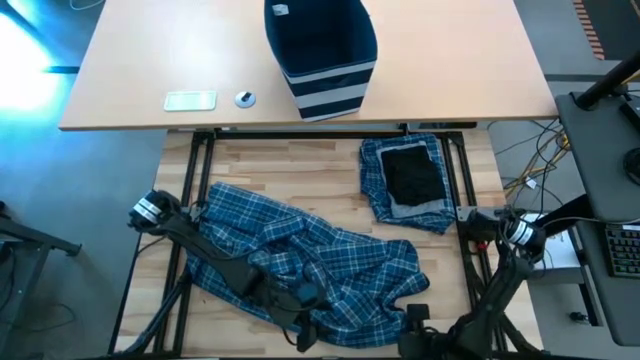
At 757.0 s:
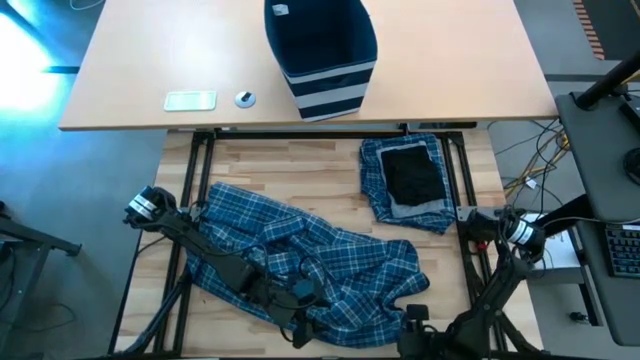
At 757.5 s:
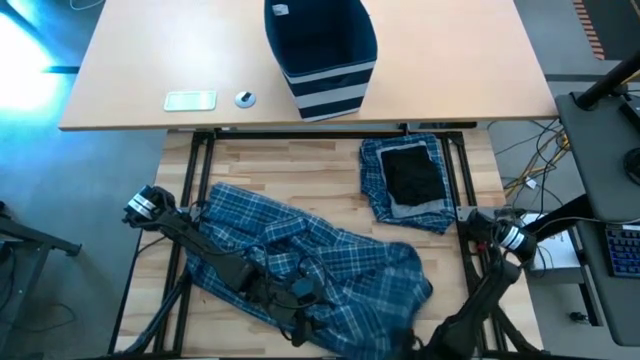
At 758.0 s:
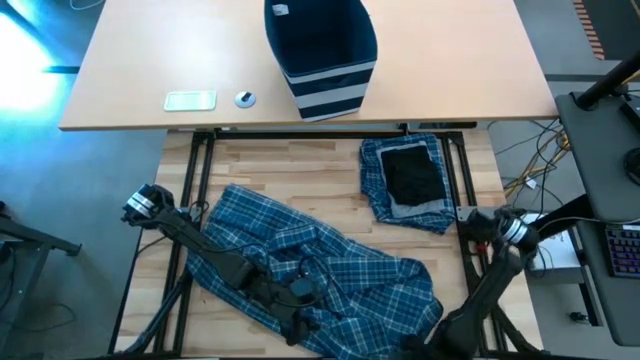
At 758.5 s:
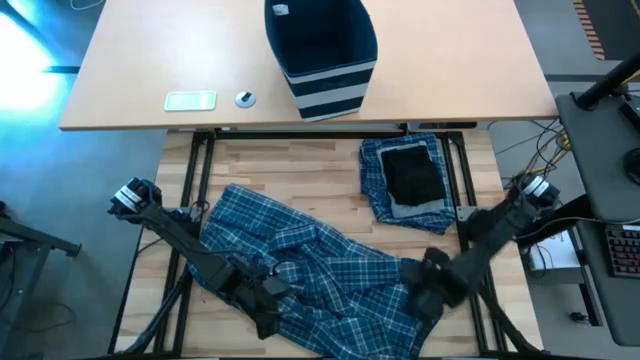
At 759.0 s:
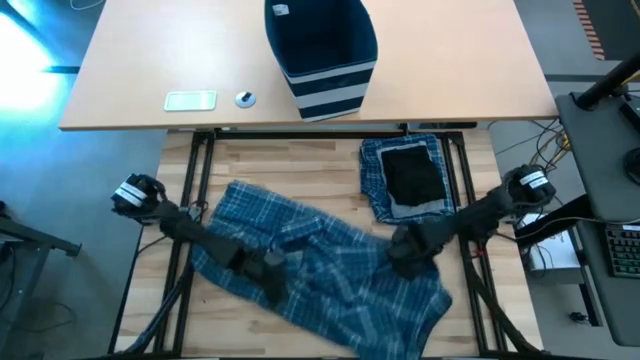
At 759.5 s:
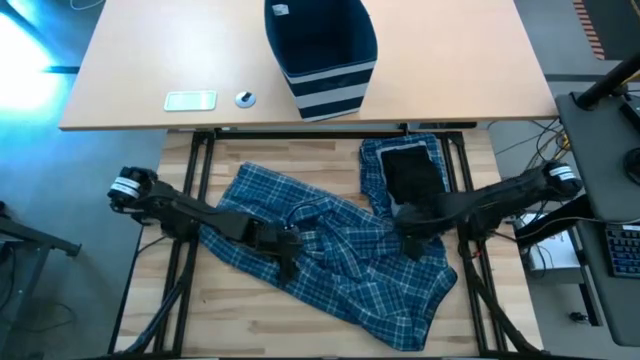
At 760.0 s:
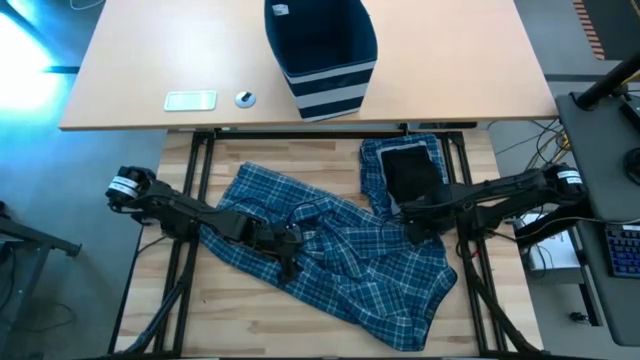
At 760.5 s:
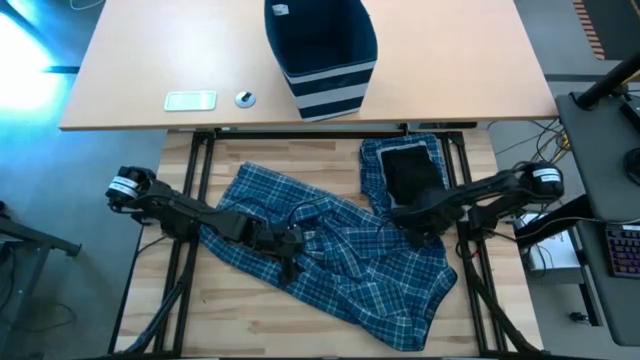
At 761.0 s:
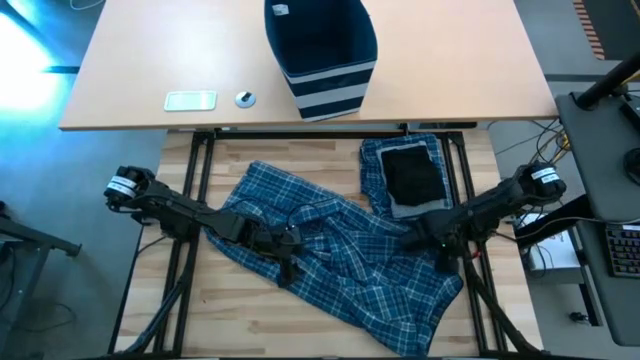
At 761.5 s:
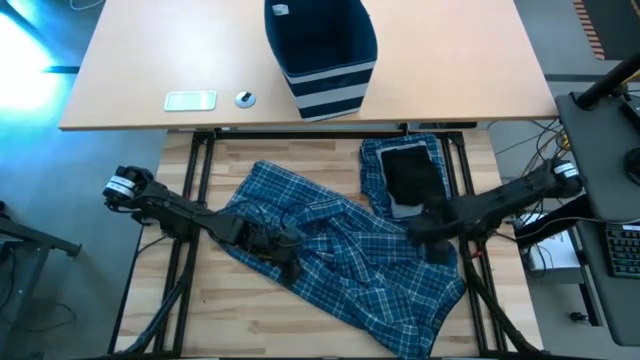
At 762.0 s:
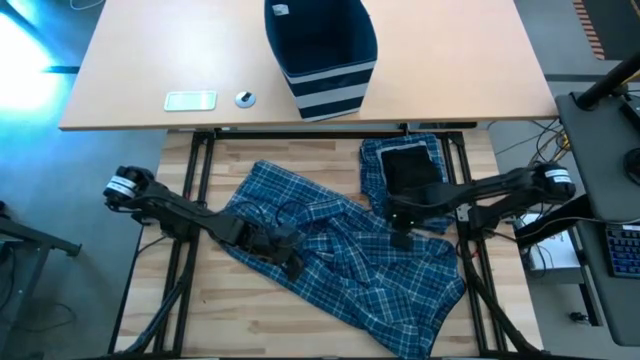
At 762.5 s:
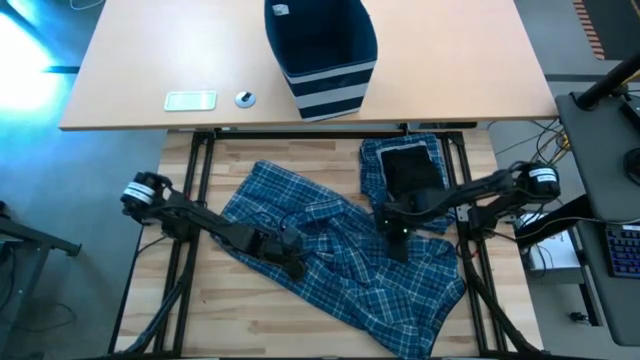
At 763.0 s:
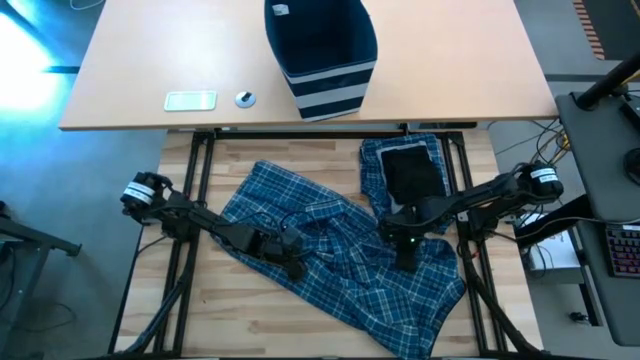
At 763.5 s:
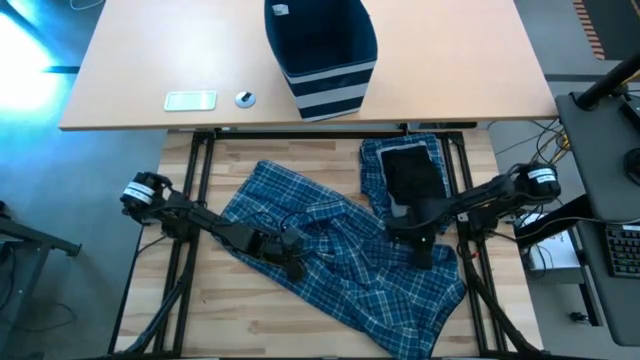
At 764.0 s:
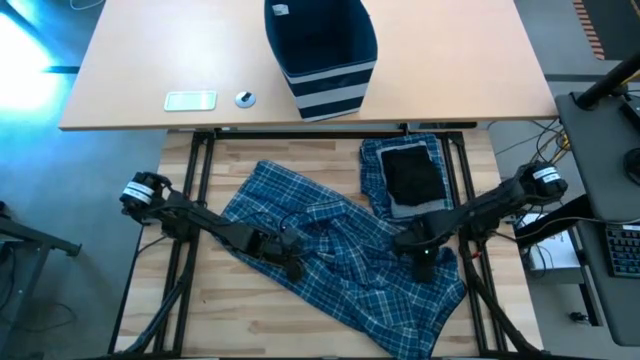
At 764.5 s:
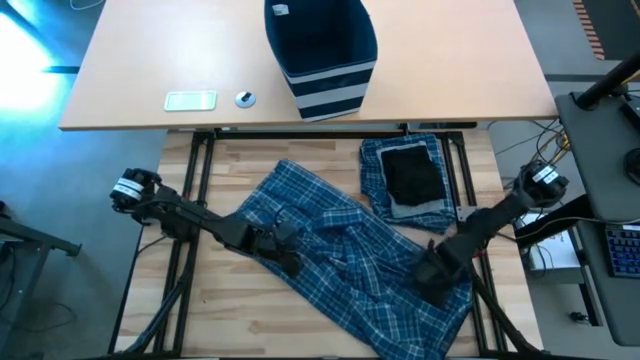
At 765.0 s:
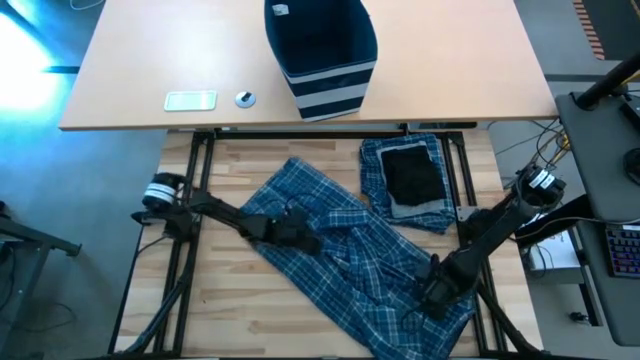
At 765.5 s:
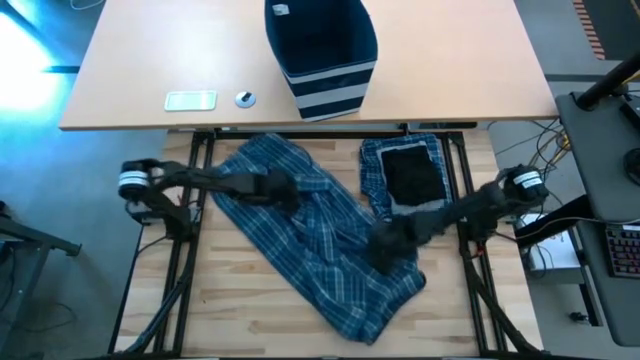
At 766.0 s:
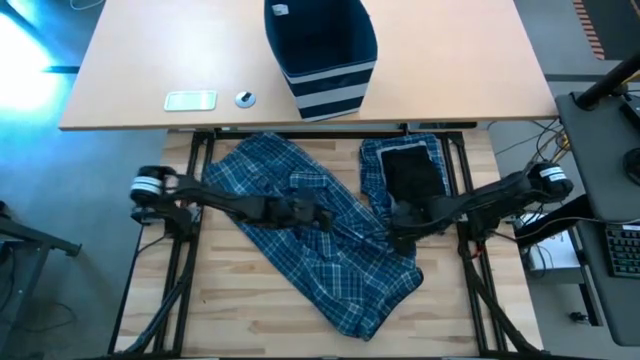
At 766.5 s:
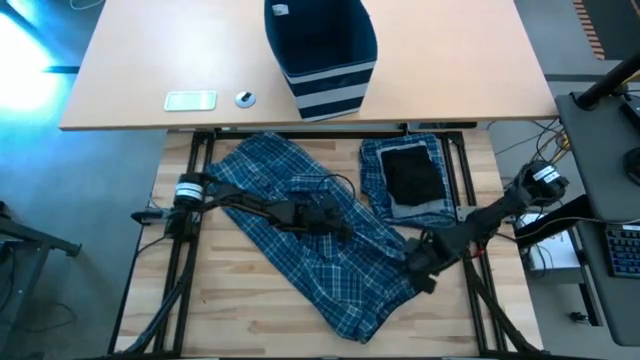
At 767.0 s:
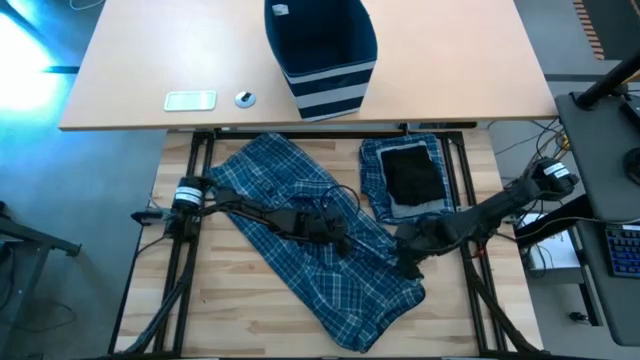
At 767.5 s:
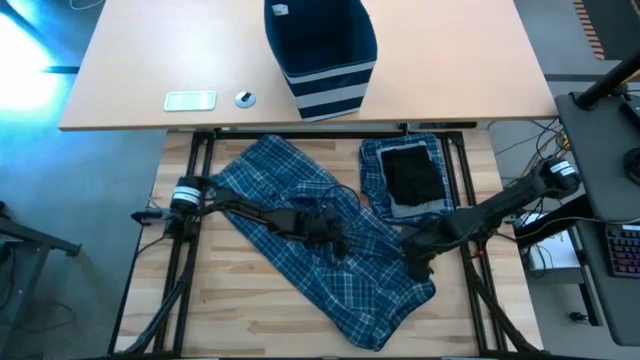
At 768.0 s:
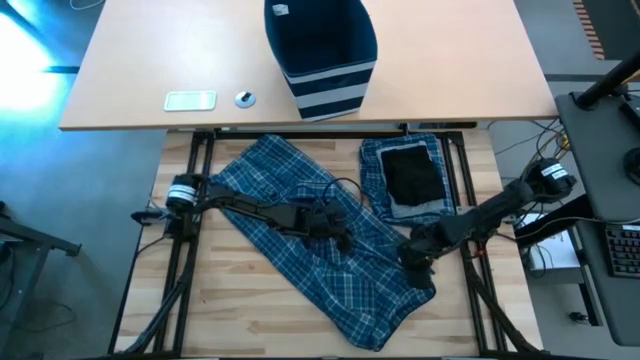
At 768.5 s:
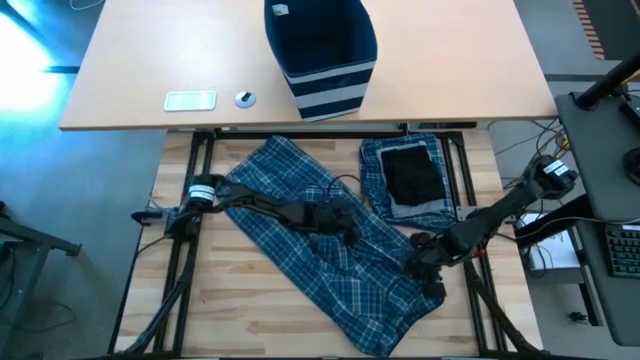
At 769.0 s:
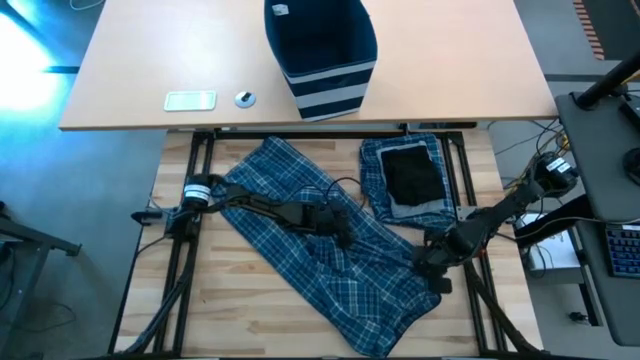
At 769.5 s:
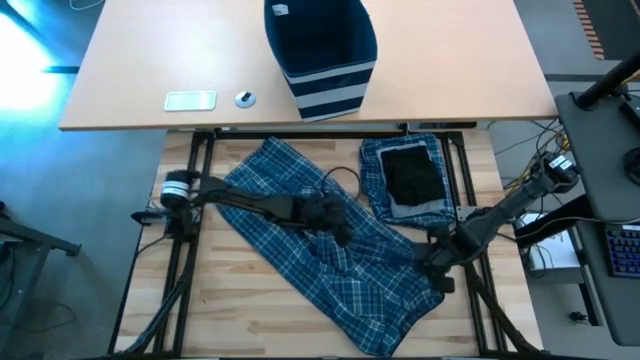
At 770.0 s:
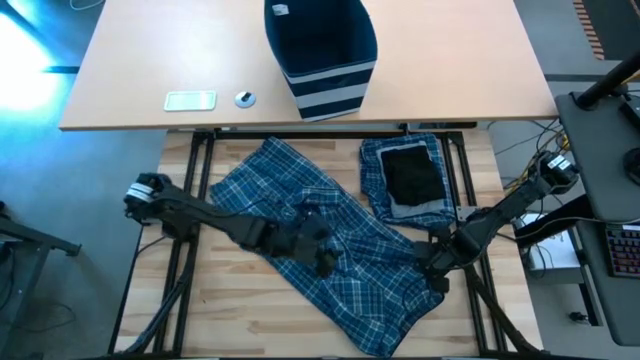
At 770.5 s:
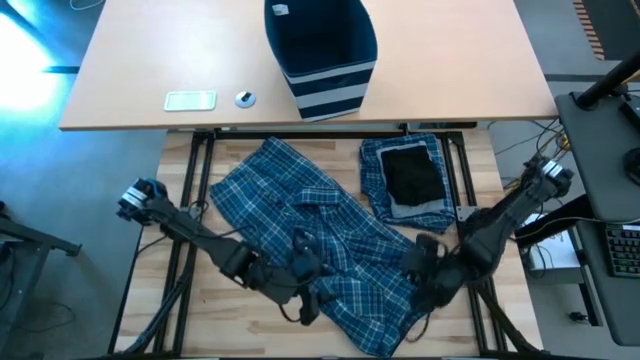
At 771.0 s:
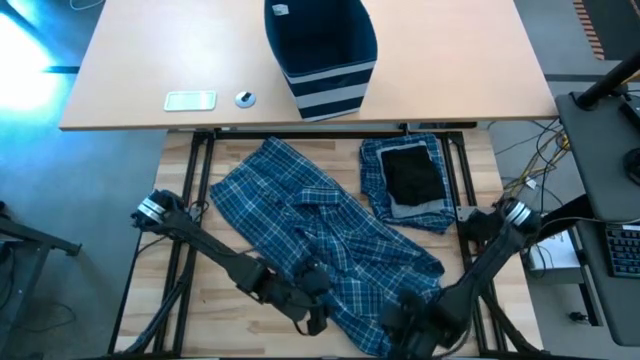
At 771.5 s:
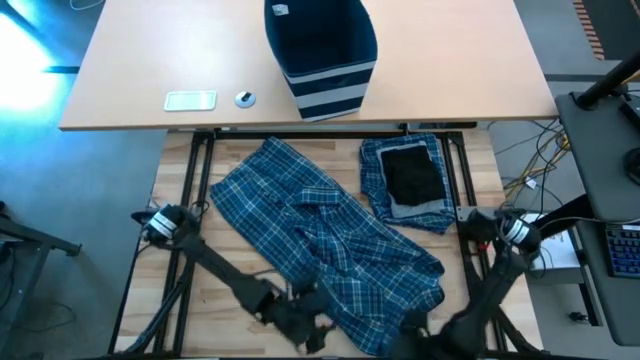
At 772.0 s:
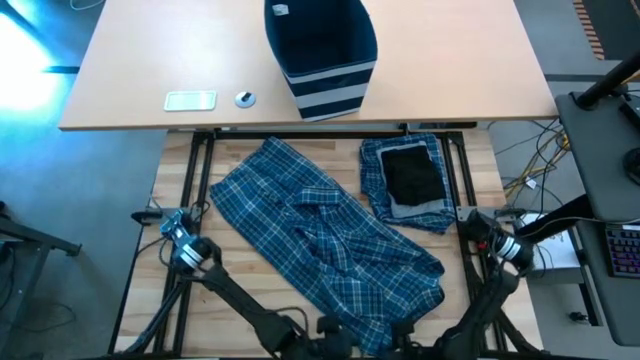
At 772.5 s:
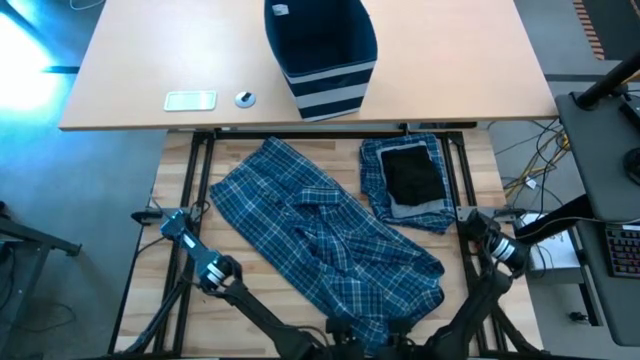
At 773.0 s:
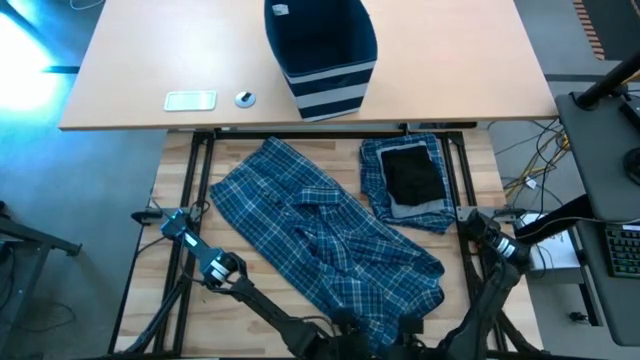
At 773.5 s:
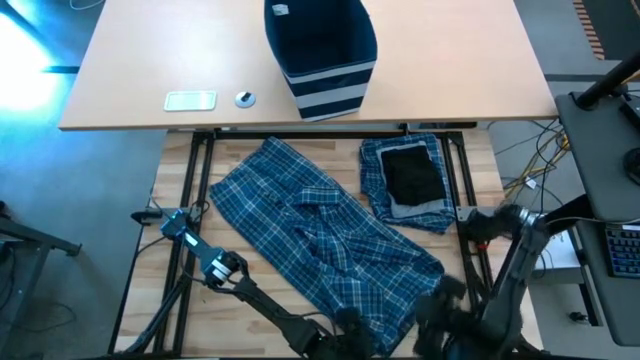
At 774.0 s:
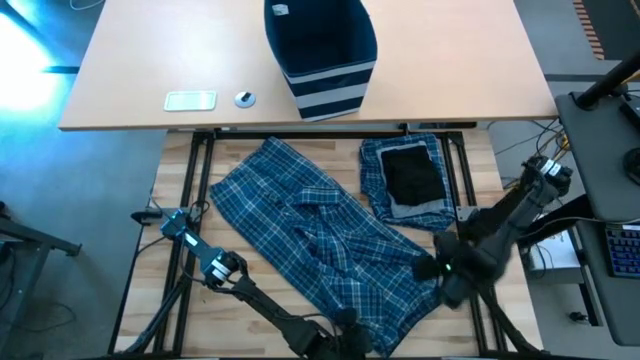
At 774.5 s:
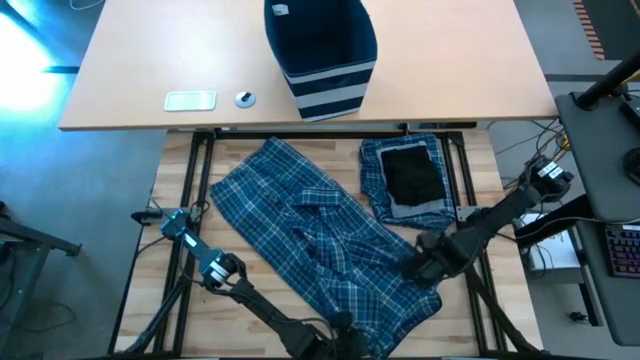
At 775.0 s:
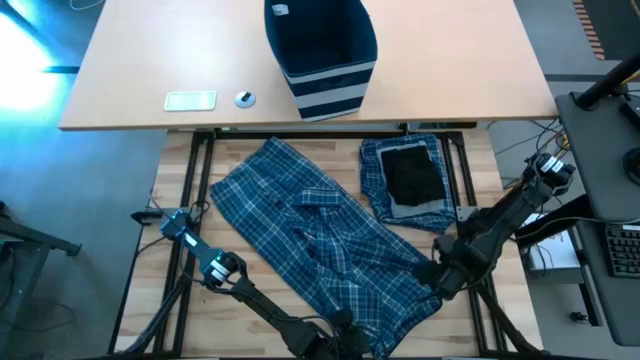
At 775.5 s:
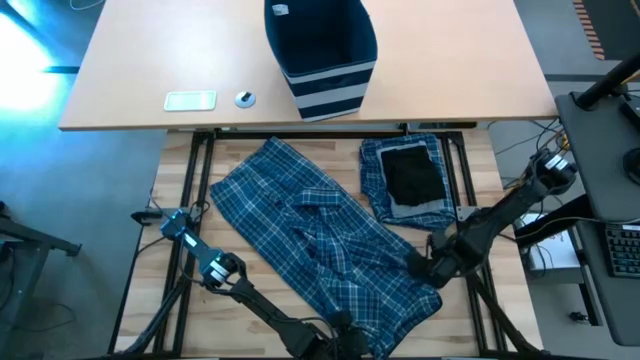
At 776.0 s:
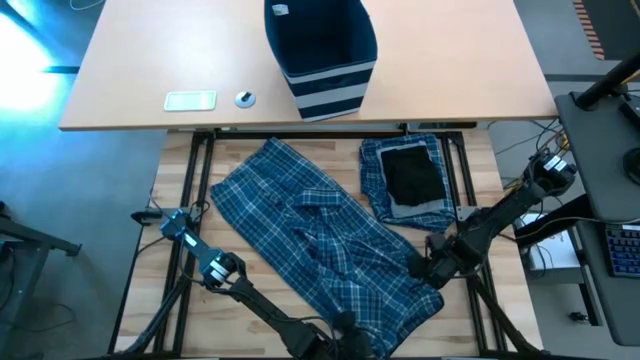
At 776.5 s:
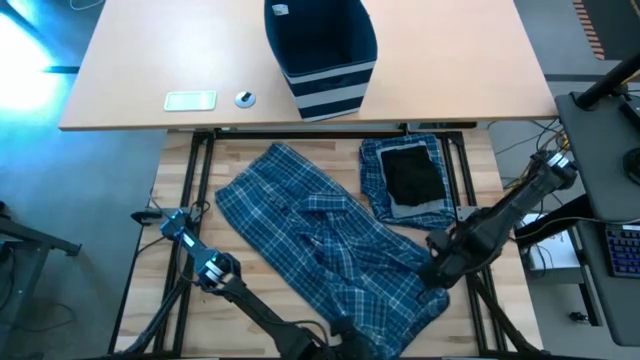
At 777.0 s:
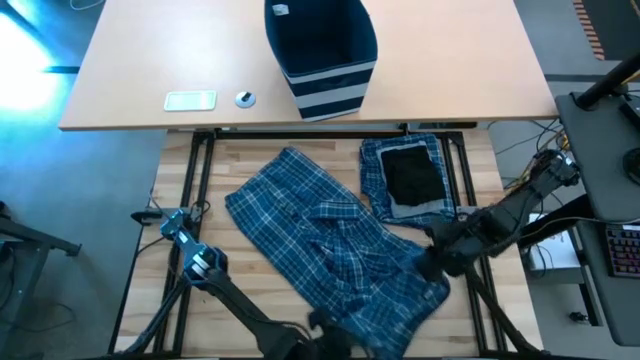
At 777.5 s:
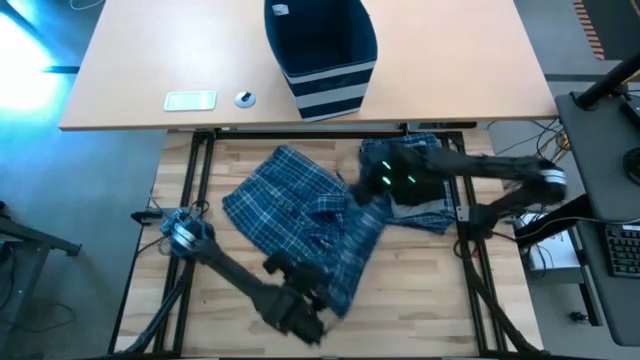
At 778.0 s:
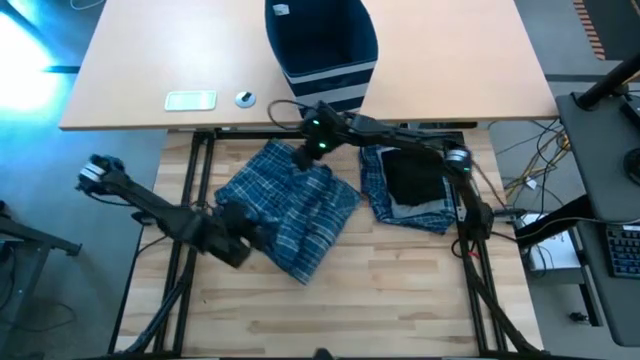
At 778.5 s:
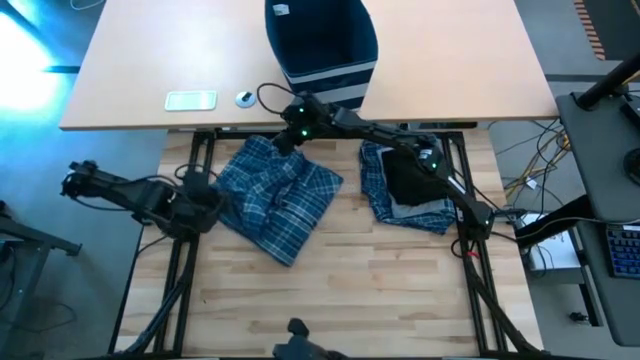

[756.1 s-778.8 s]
Task: Fold Laundry from Bin
Fold the blue patterned long sleeve
